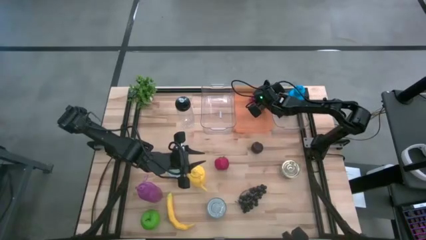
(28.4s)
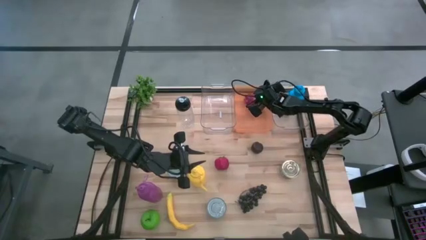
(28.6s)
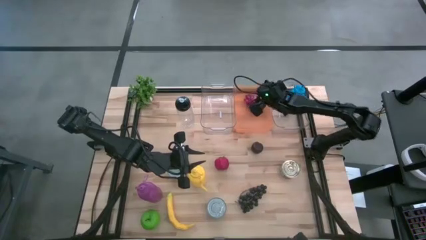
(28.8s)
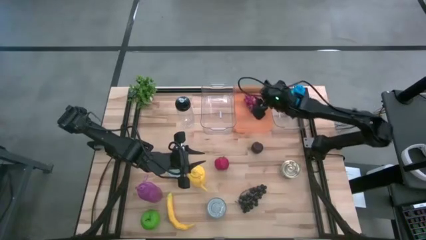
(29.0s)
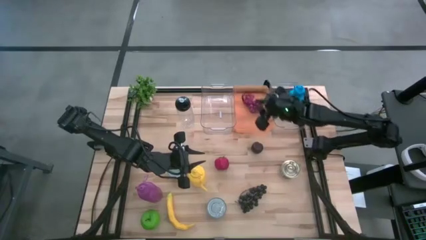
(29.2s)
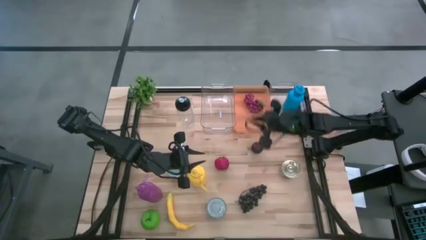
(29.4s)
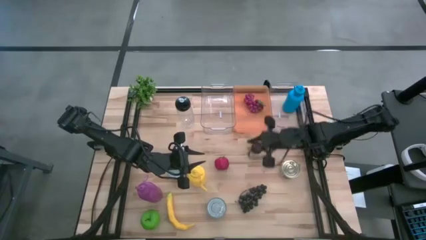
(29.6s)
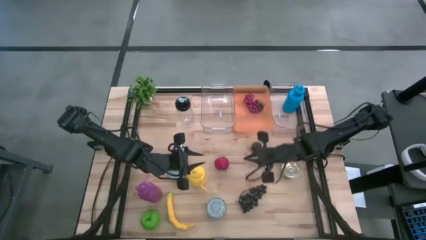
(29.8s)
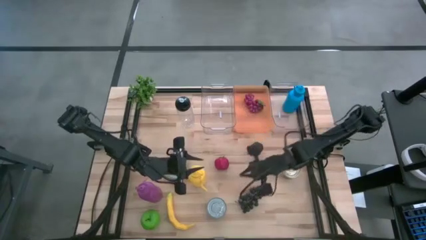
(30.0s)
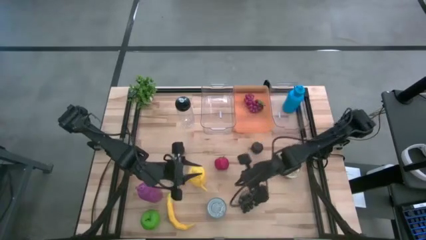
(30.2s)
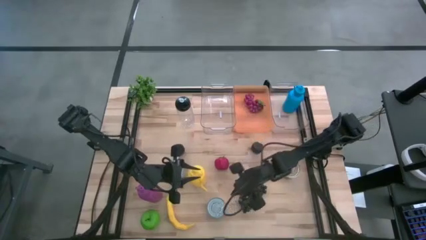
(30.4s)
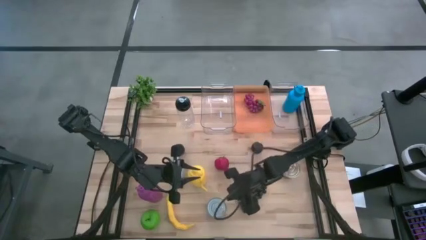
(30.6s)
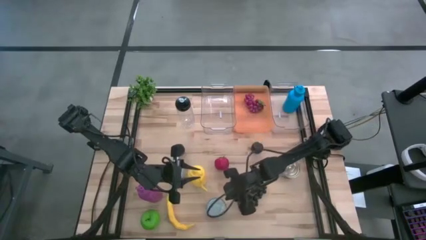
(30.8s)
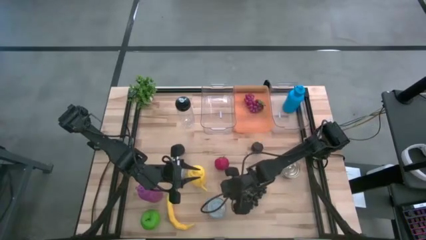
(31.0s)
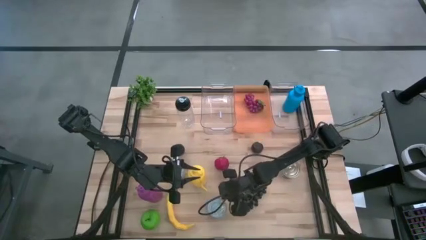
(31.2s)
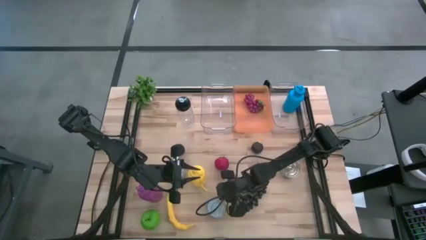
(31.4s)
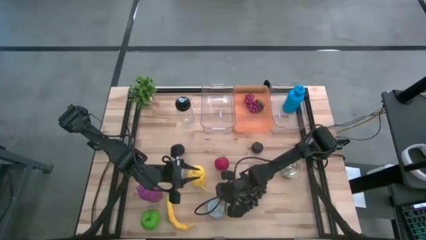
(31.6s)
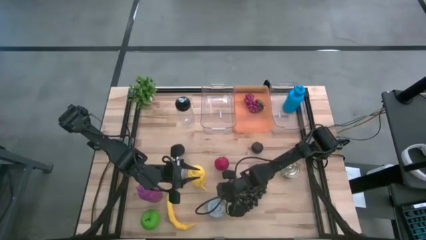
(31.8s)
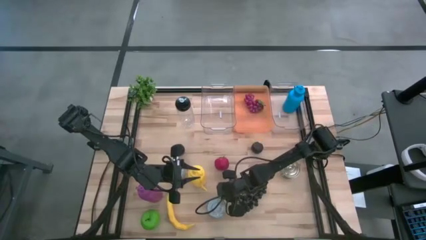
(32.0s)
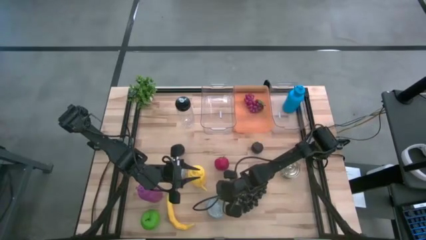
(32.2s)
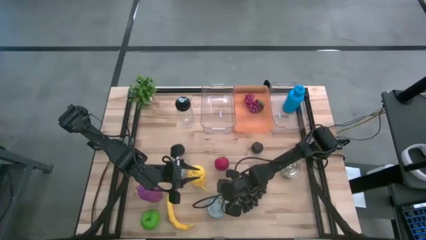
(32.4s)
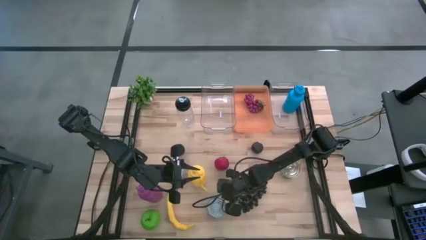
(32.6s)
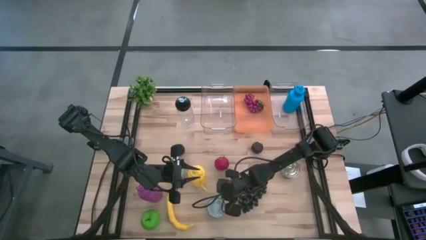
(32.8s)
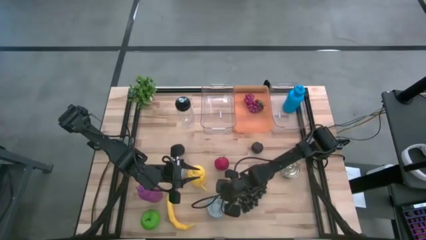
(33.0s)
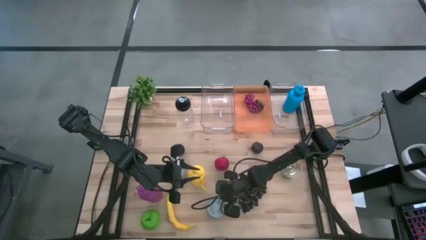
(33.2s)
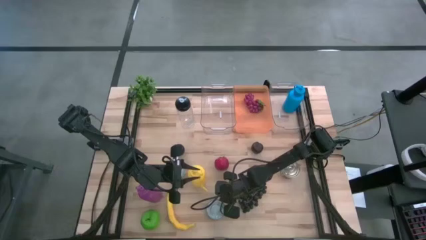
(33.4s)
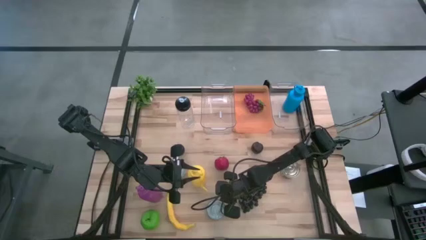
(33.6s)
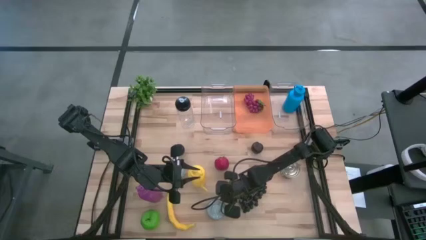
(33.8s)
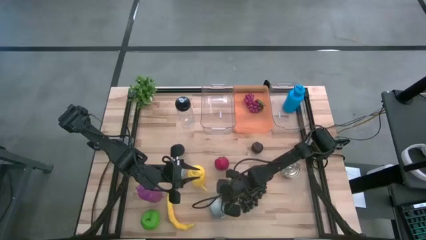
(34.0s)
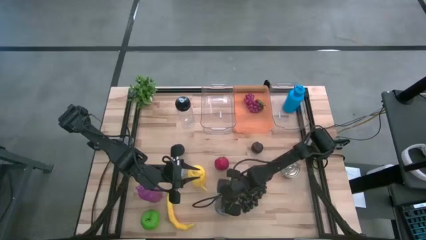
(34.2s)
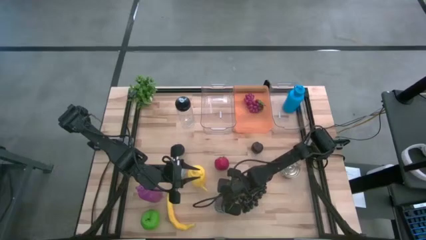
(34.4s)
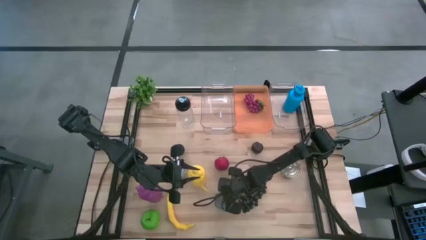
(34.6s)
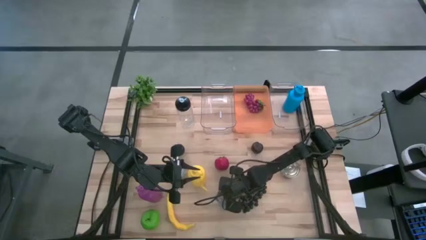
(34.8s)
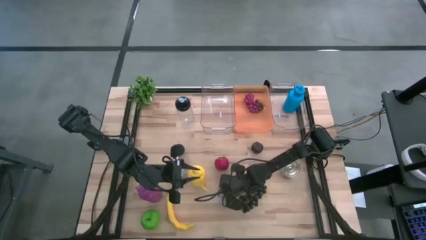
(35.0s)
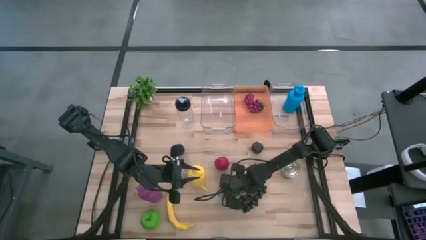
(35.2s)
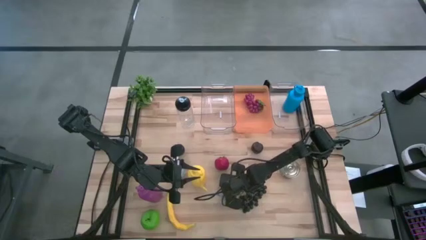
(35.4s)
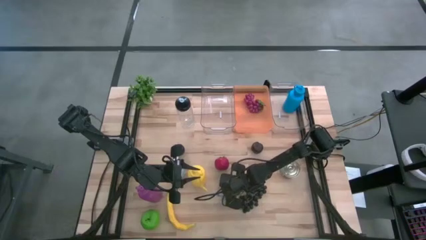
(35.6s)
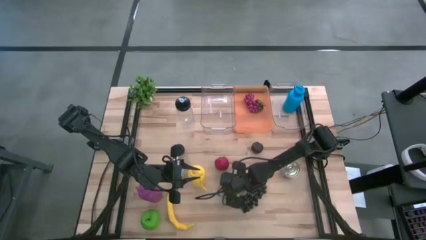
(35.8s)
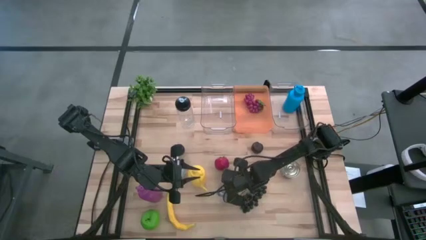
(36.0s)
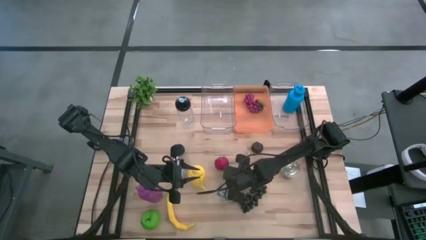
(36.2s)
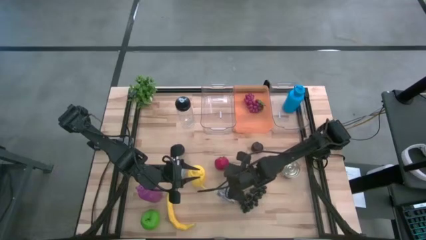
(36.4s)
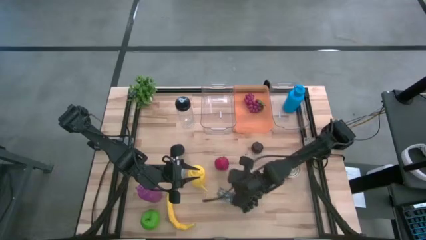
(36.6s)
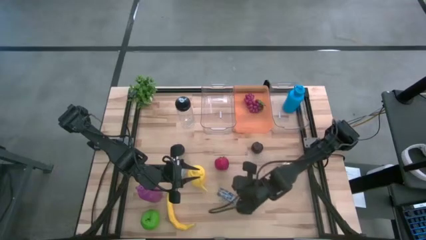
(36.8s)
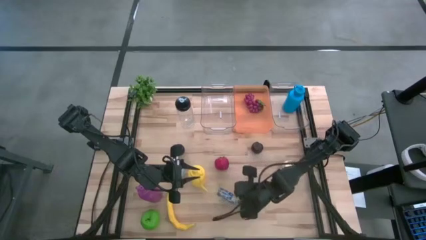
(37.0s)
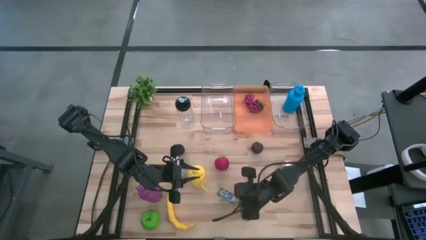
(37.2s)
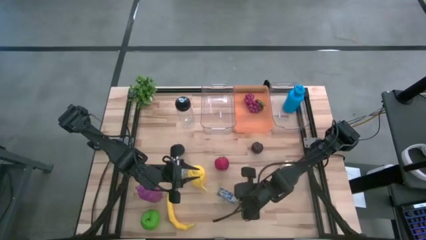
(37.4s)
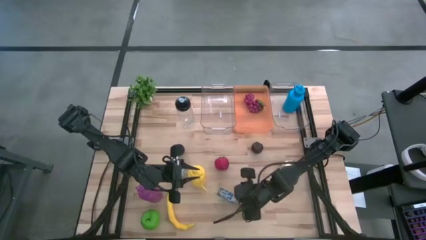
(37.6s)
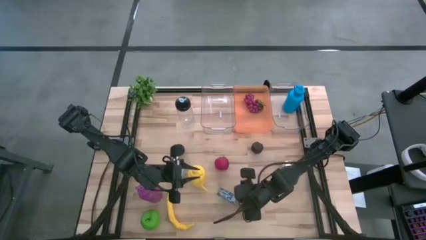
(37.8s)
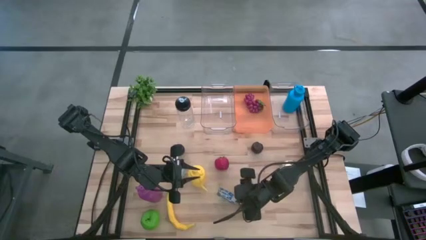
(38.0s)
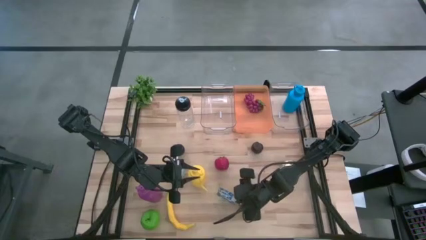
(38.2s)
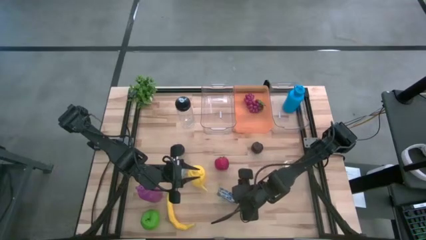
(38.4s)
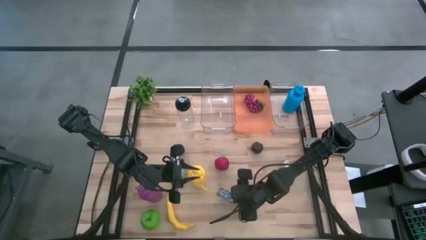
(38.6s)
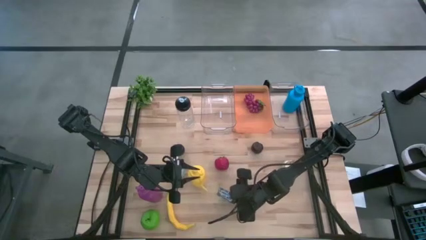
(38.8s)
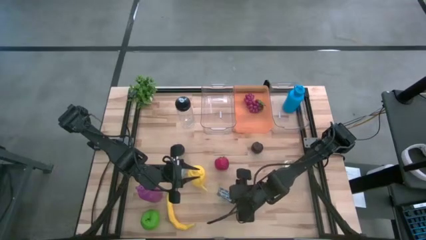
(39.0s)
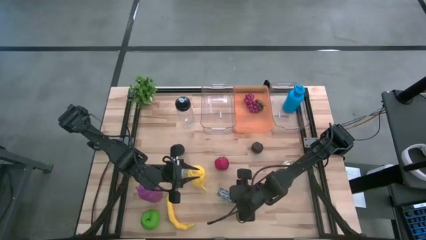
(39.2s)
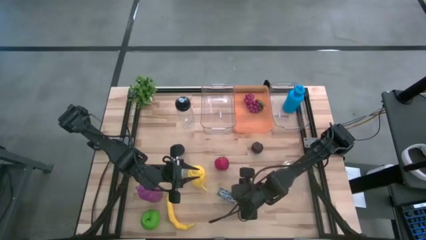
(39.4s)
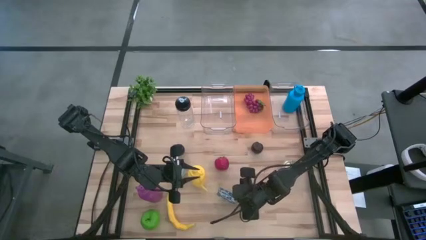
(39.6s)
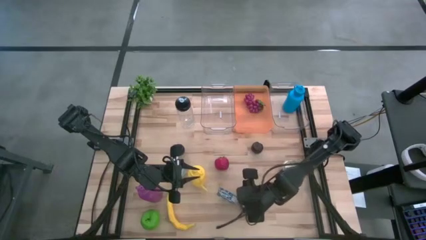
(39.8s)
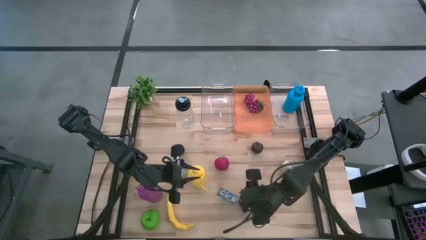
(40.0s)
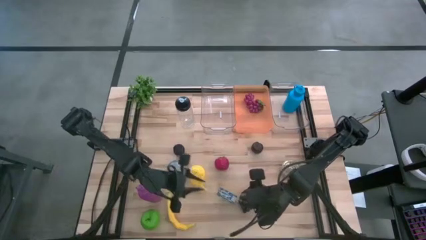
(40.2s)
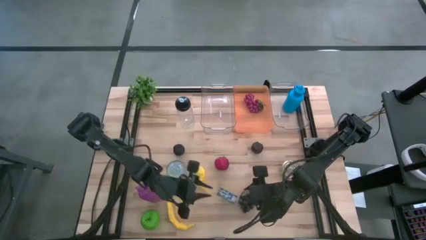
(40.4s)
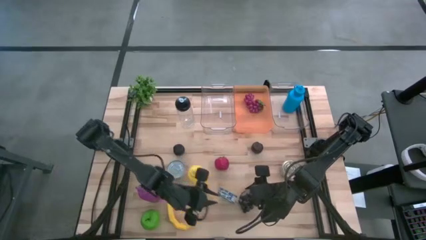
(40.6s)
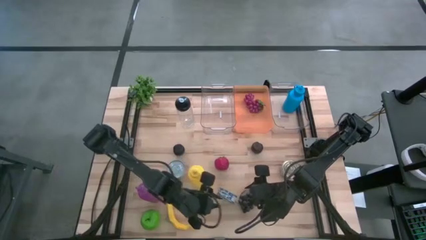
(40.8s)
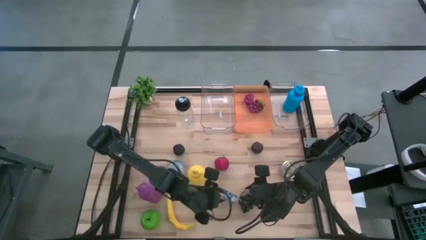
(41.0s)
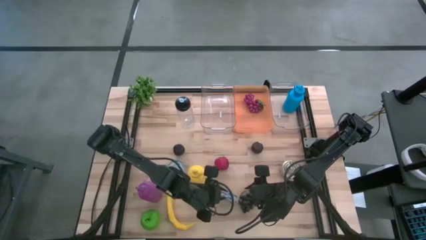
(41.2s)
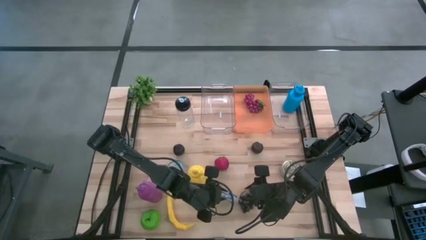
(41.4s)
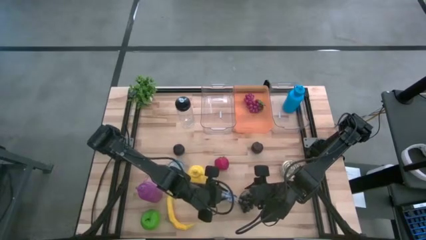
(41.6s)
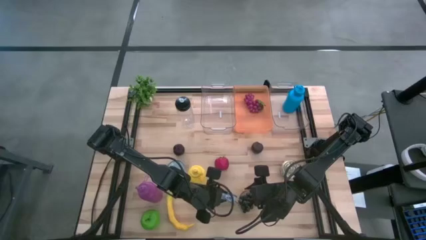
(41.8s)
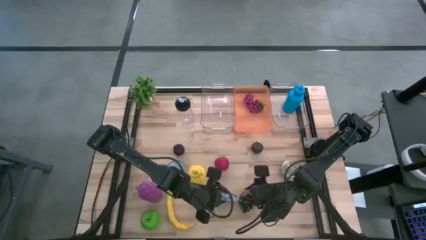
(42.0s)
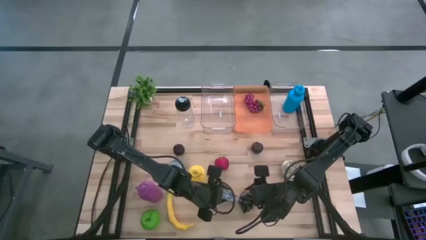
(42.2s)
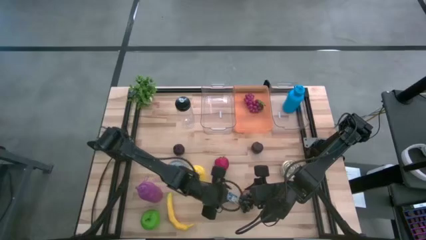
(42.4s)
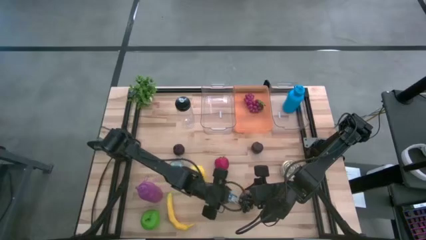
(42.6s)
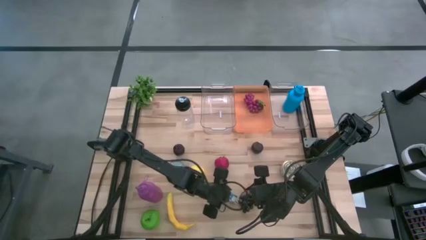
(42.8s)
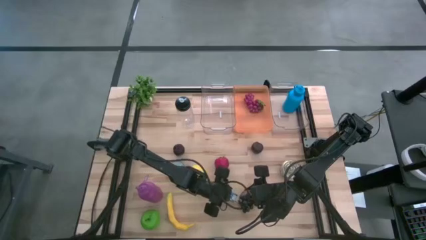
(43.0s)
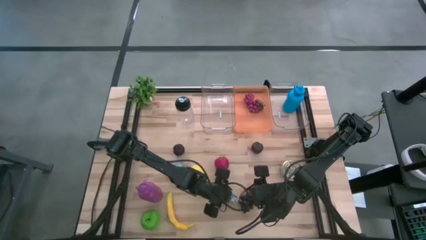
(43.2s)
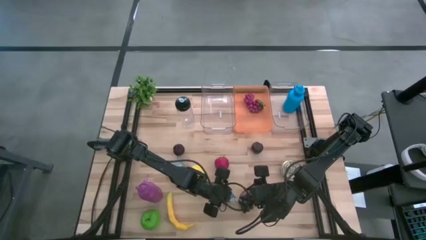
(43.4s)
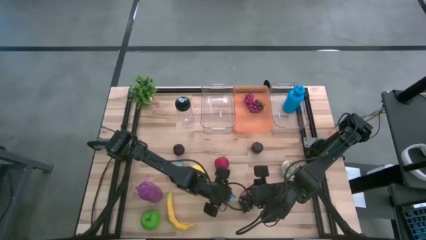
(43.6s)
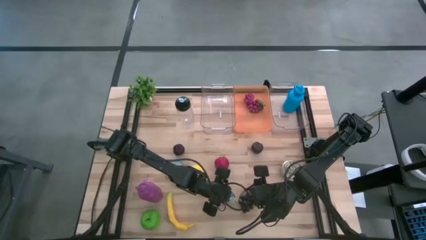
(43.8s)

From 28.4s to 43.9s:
Task: Pick & Place Food Item
Put the blue tuna can into the left transparent bin
